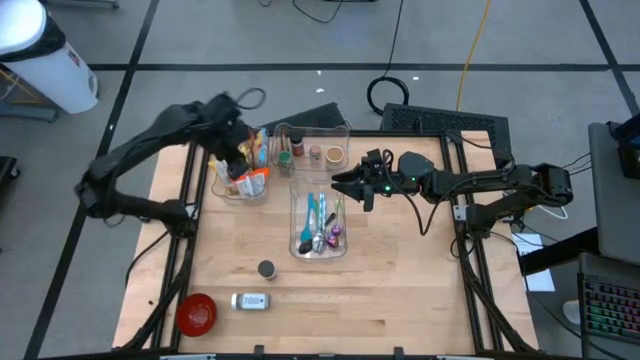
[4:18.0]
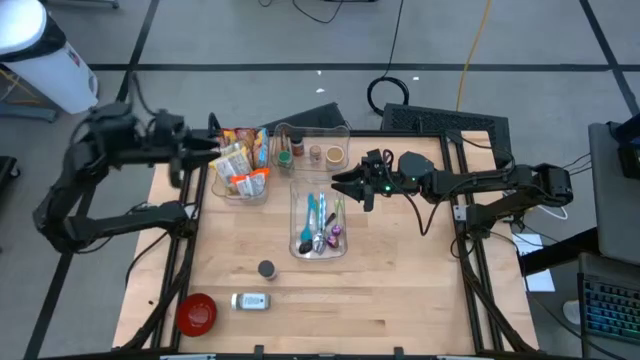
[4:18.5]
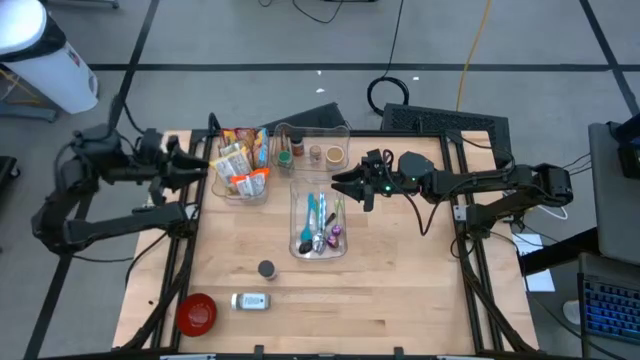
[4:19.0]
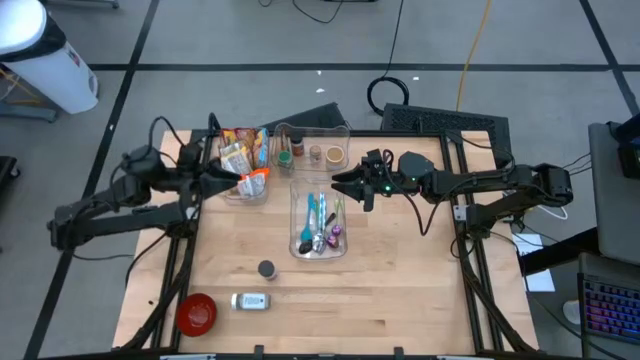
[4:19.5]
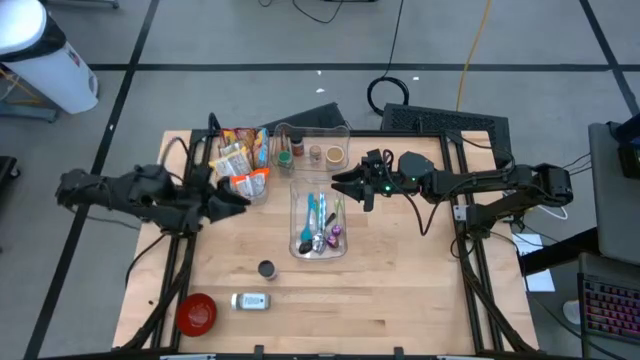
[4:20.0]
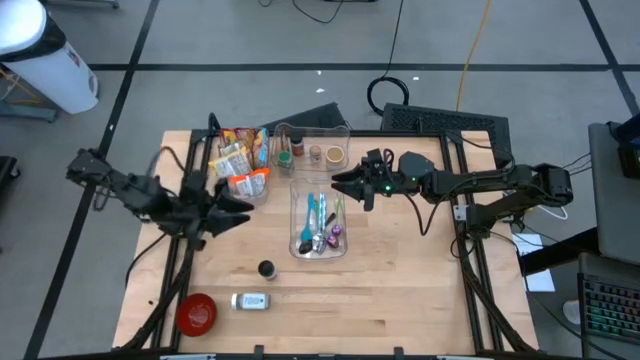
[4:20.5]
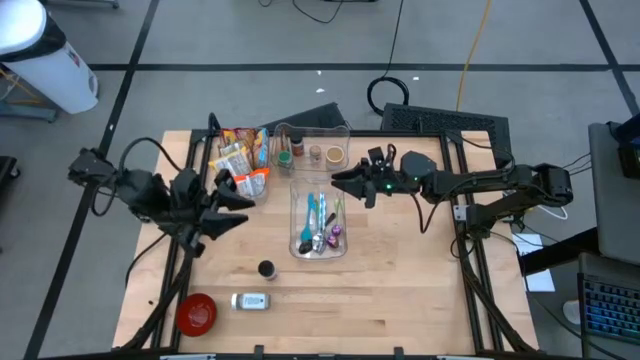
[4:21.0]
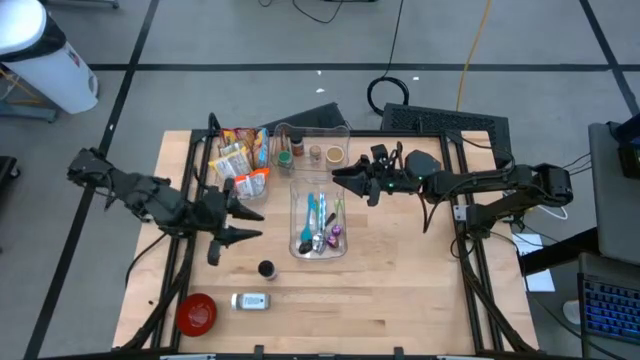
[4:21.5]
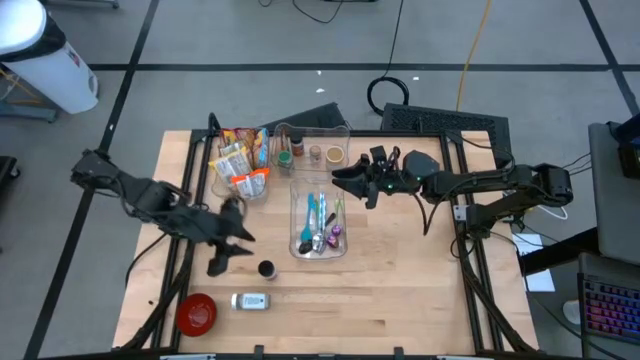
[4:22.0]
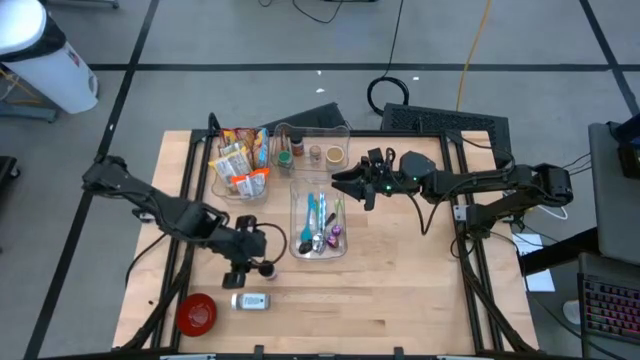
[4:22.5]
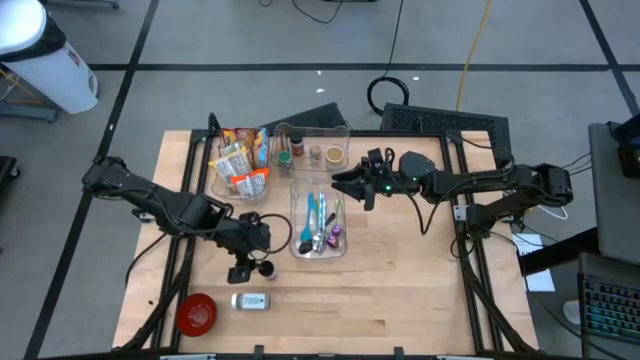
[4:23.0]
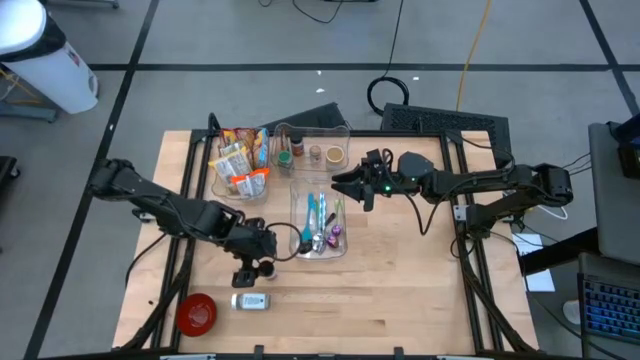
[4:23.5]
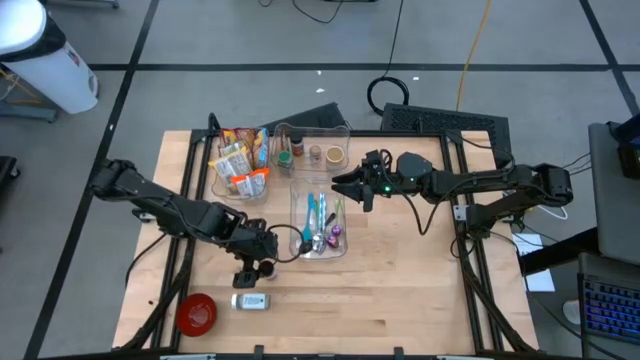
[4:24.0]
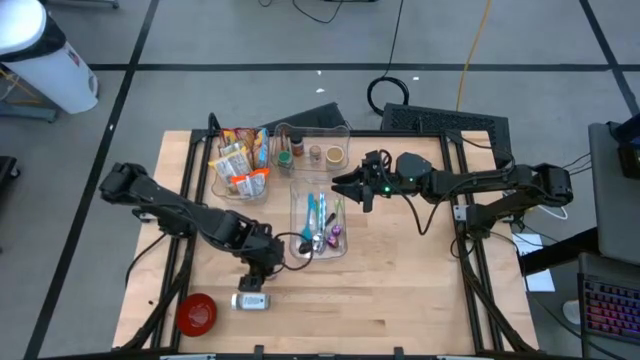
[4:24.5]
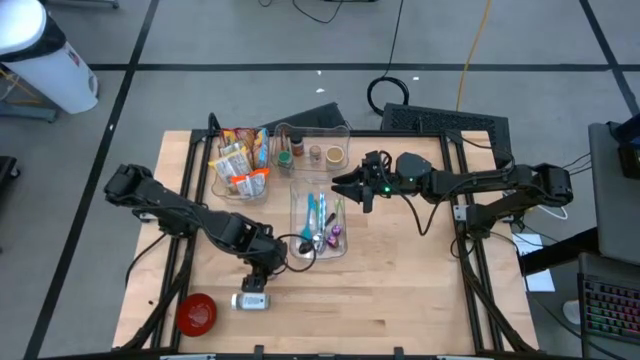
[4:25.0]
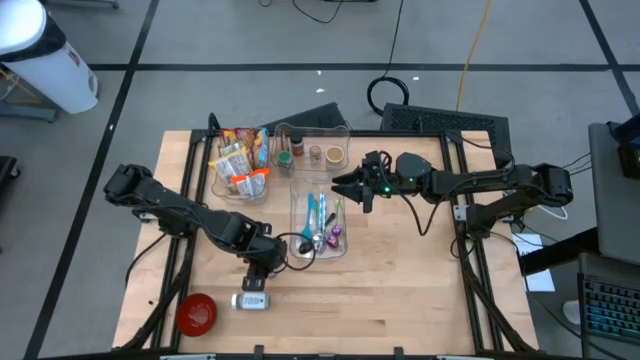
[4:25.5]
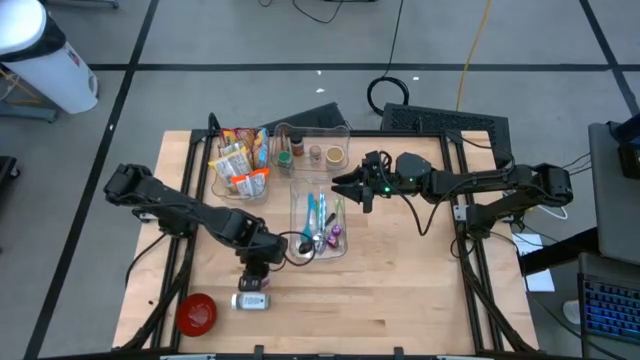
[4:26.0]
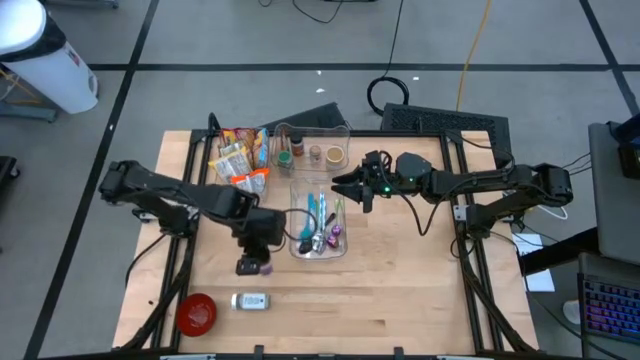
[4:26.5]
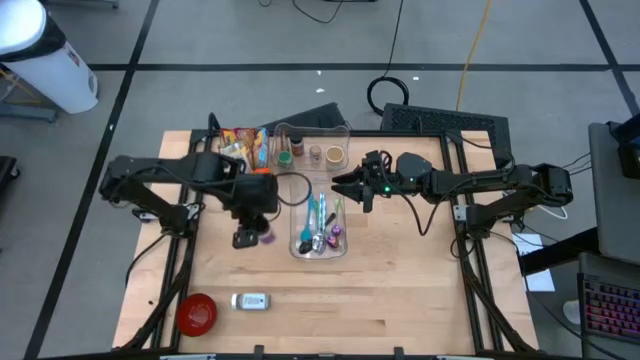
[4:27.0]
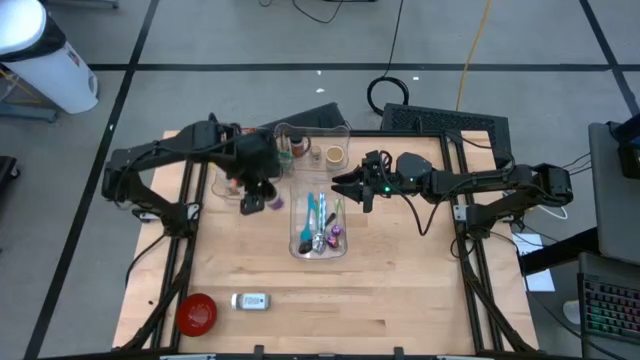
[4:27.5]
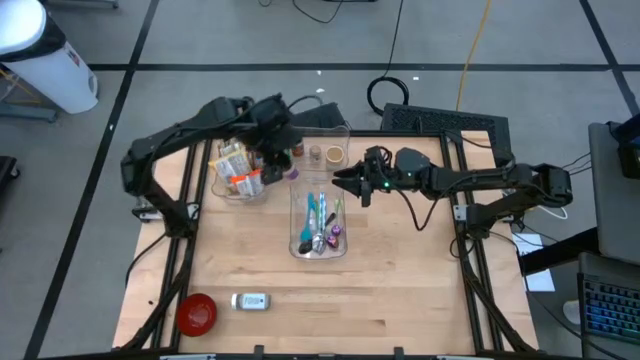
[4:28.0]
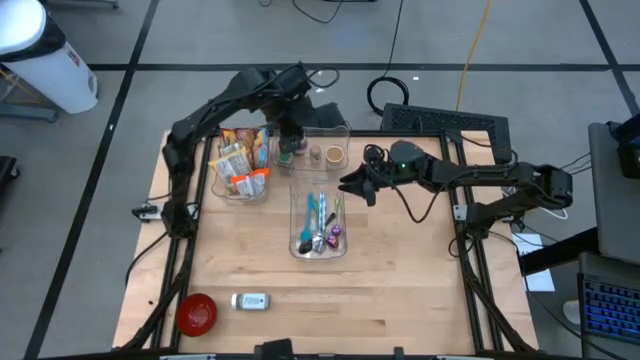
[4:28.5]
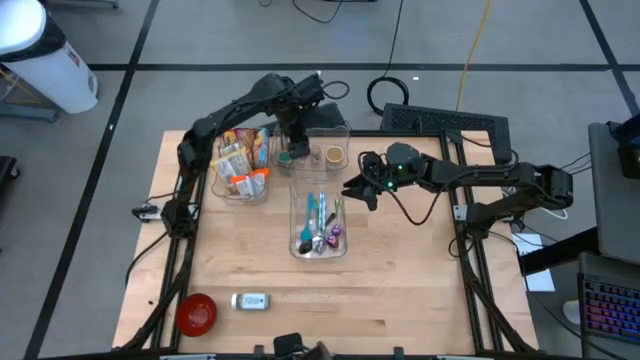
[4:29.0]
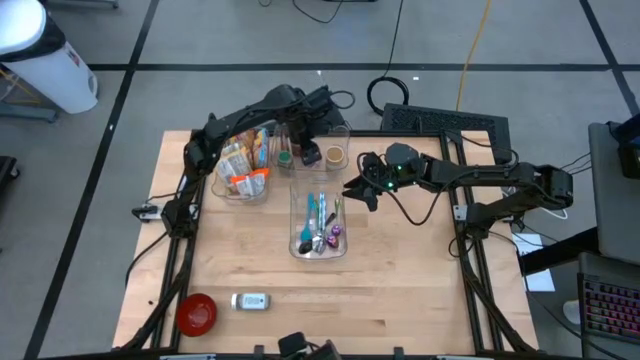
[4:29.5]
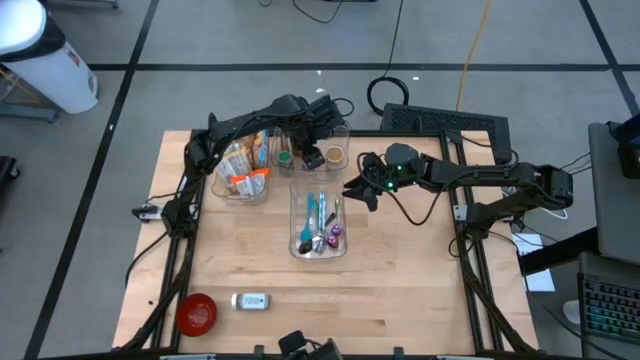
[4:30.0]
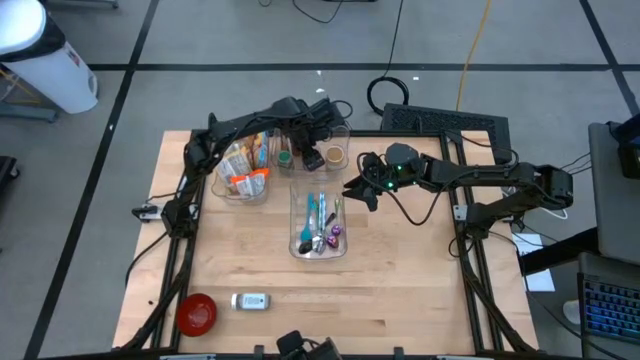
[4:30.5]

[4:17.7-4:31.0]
Task: Pick & Place Food Item
Put the purple seasoning bottle into the top right transparent bin
